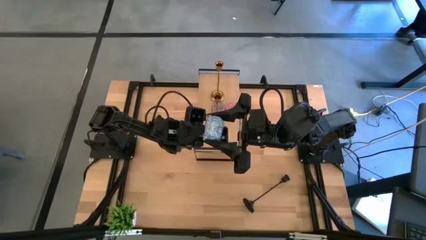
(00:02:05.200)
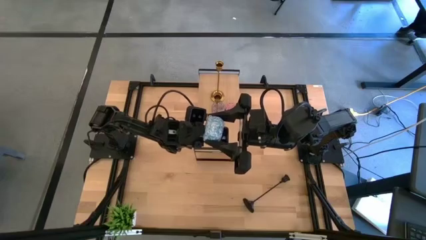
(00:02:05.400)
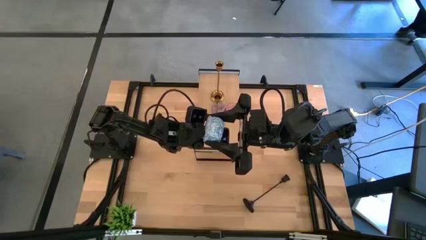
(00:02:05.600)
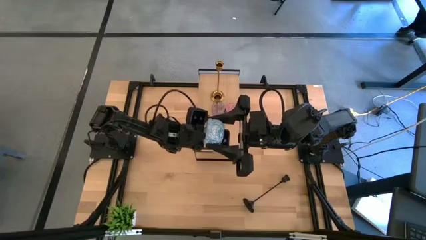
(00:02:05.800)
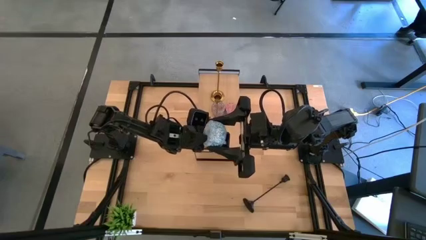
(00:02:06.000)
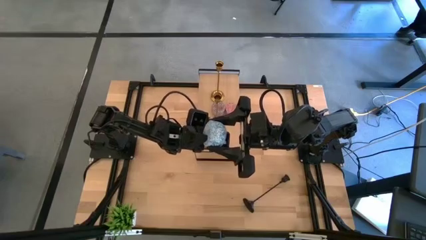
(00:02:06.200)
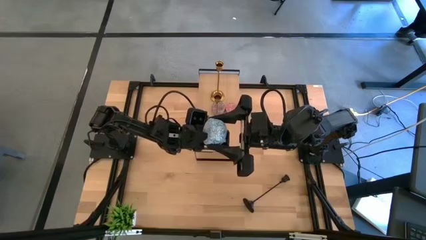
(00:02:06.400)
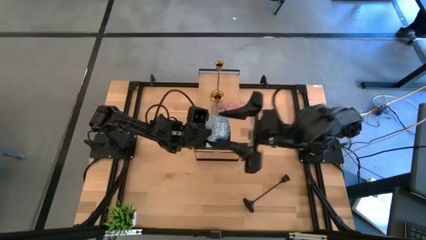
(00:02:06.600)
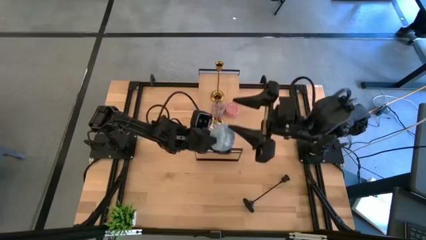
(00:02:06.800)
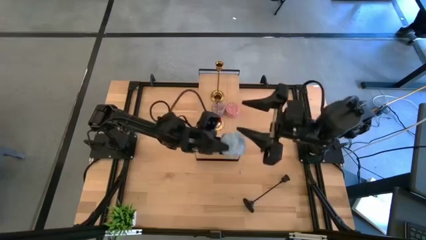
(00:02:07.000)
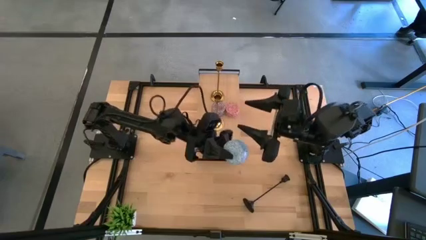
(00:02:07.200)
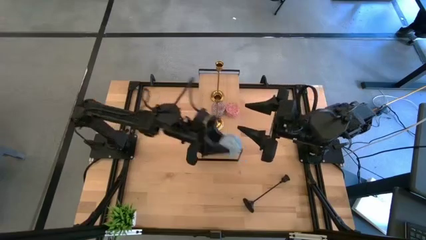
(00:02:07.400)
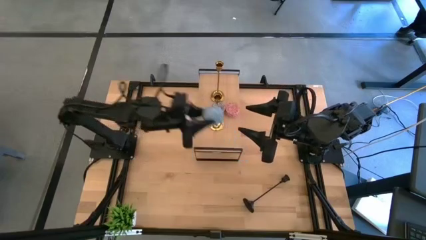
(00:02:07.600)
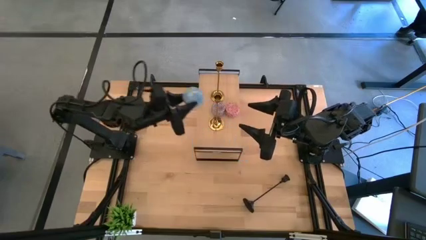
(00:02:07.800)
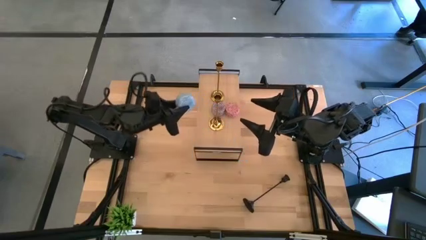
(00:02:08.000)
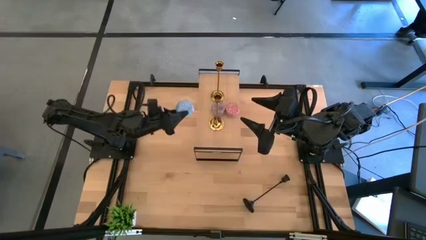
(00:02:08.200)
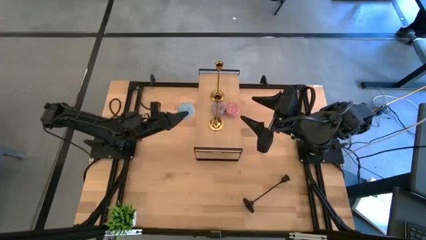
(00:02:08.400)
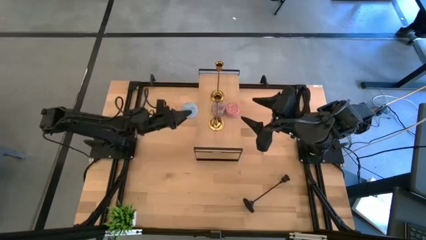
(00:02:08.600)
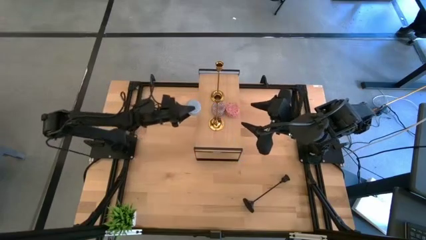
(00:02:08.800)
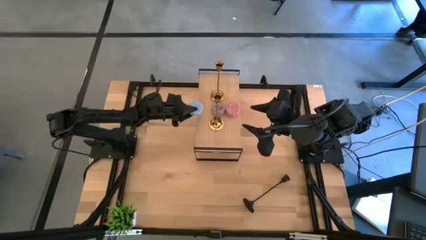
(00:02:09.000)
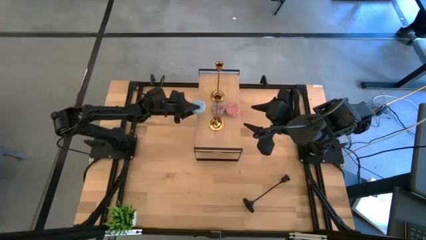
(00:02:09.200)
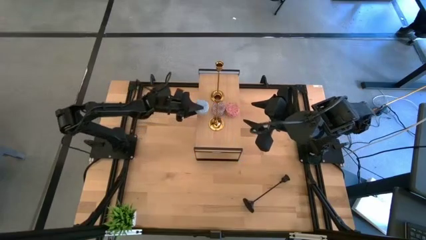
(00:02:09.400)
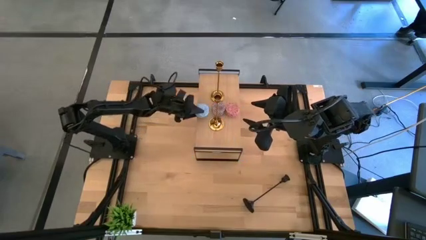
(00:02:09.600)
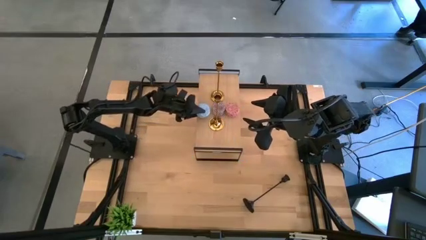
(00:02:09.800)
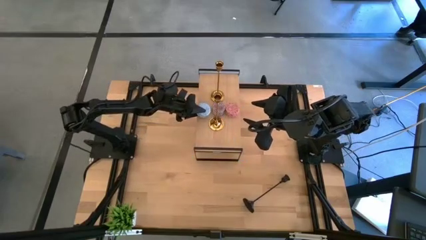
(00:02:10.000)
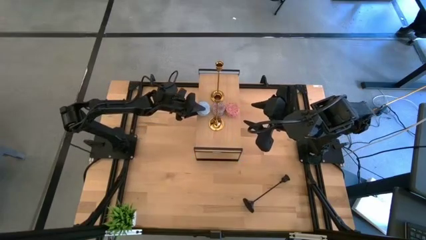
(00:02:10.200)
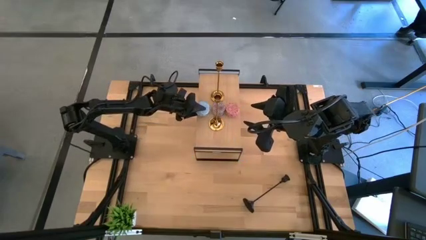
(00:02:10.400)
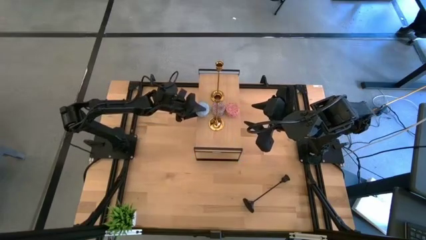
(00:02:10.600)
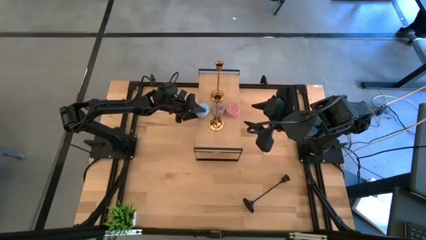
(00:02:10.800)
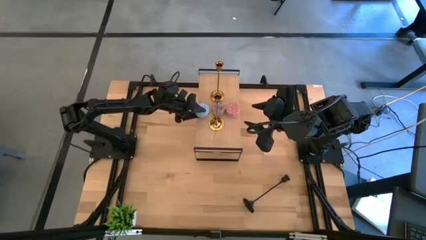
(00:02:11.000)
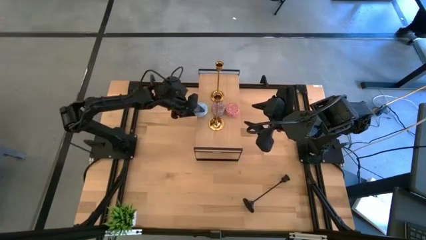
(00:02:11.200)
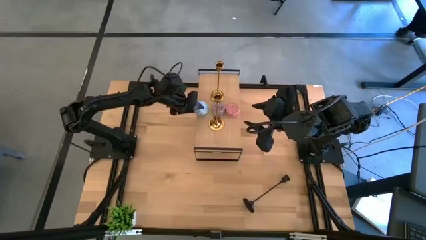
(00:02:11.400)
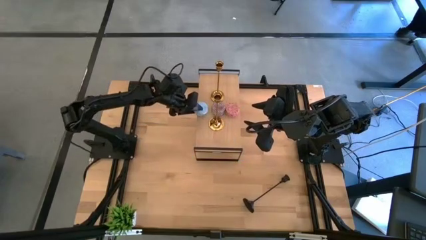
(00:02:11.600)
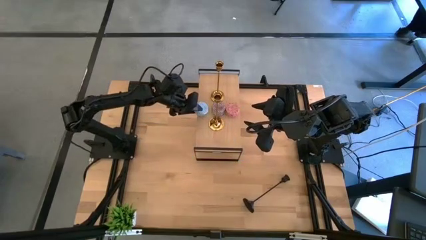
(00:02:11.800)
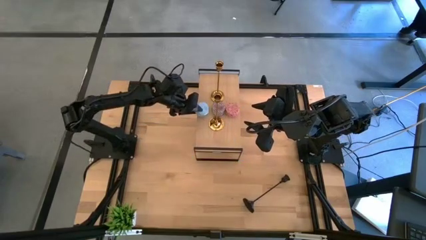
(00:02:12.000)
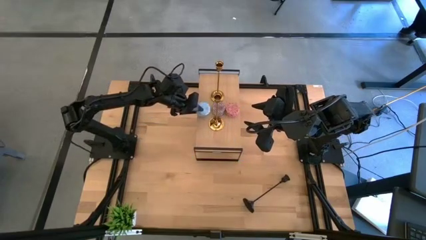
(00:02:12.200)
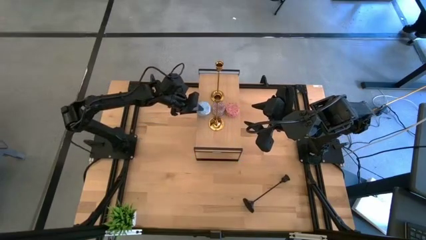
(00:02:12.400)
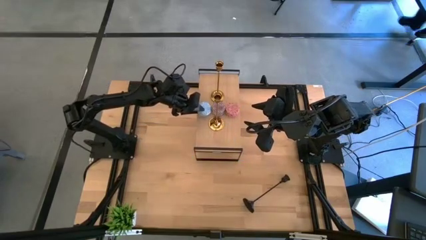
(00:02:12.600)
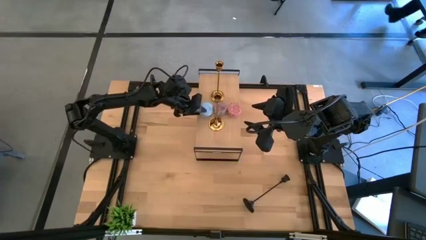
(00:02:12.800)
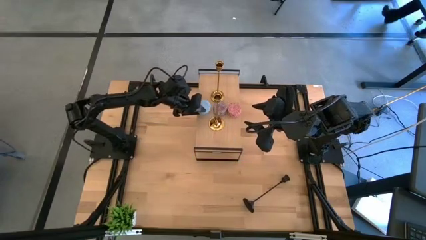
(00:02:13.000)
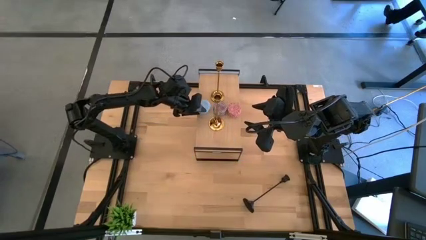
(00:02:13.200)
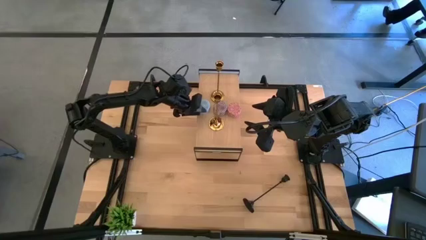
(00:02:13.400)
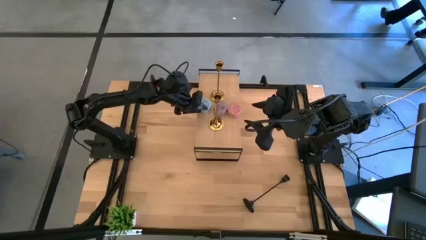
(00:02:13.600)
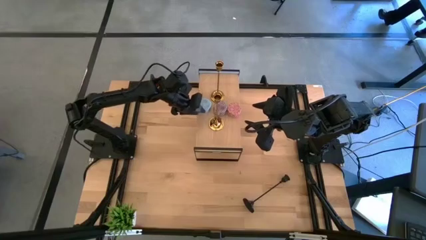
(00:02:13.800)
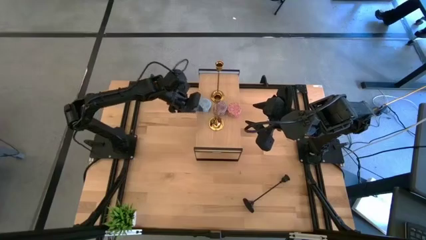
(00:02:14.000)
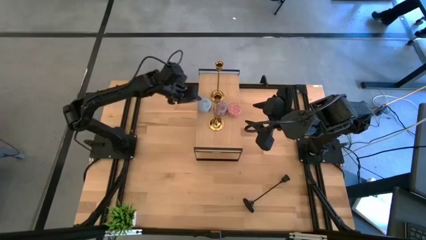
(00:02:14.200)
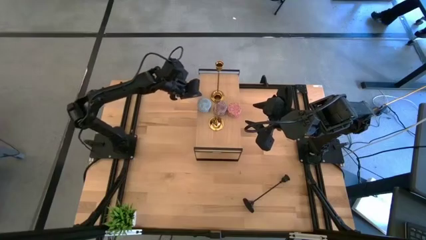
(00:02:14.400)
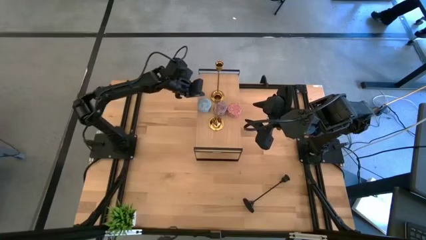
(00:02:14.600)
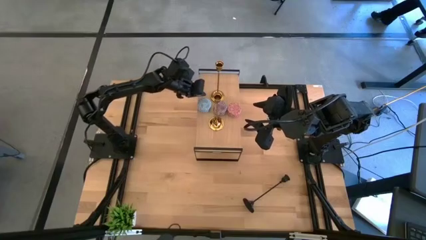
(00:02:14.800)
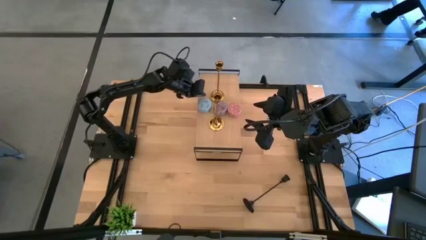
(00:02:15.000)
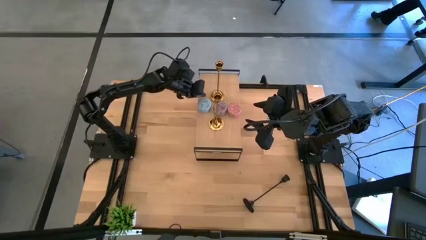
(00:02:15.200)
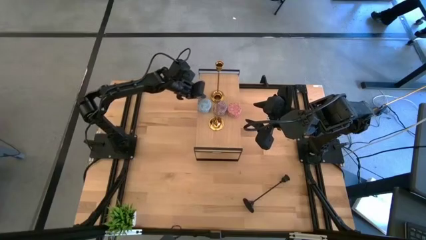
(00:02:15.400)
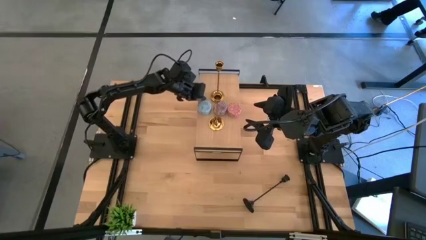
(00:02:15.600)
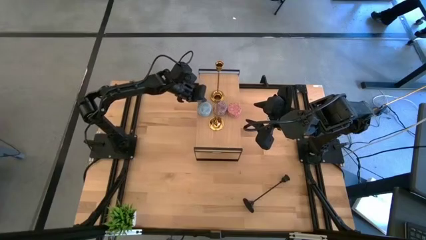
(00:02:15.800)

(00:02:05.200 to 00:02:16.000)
Task: Pick & Place candle stick holders
Put the blue scented candle on the shelf

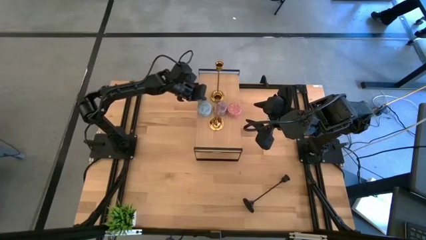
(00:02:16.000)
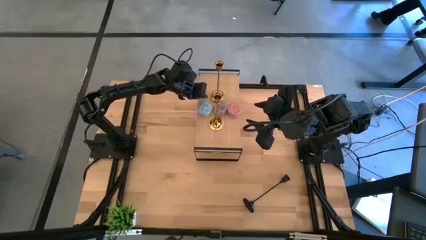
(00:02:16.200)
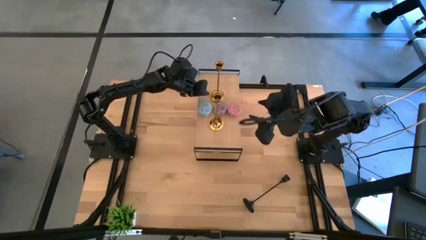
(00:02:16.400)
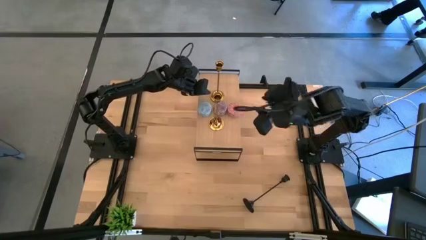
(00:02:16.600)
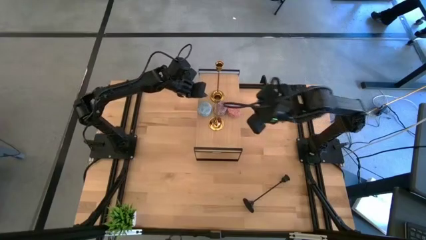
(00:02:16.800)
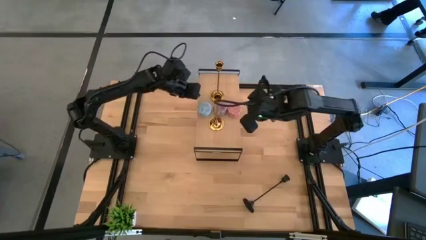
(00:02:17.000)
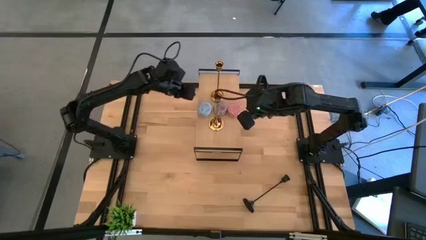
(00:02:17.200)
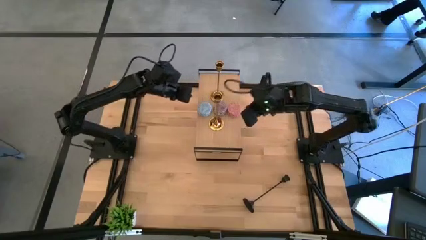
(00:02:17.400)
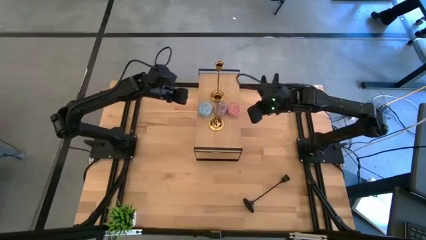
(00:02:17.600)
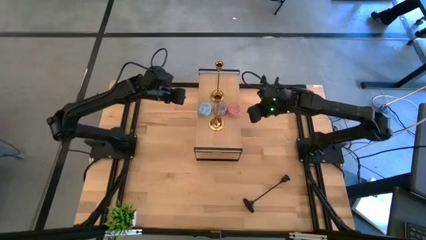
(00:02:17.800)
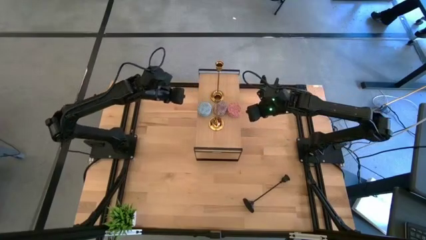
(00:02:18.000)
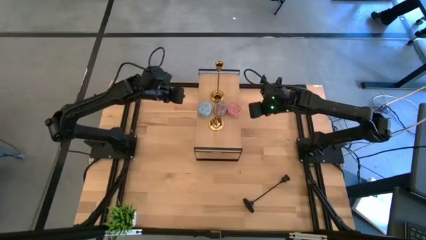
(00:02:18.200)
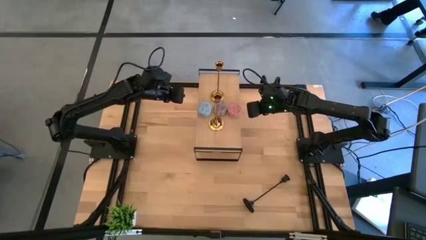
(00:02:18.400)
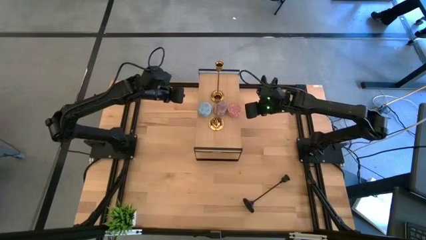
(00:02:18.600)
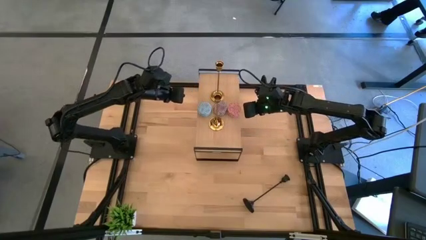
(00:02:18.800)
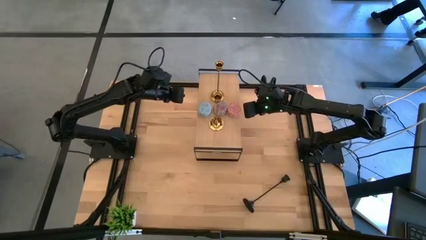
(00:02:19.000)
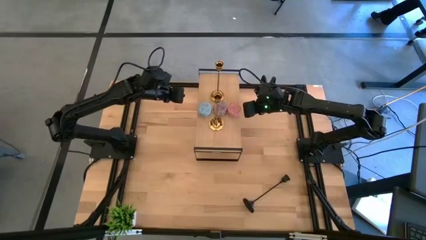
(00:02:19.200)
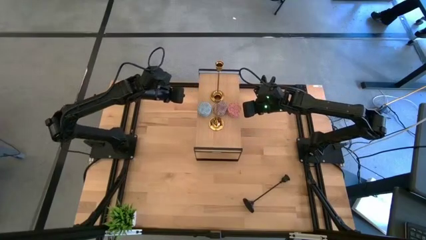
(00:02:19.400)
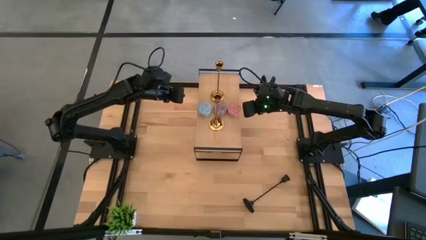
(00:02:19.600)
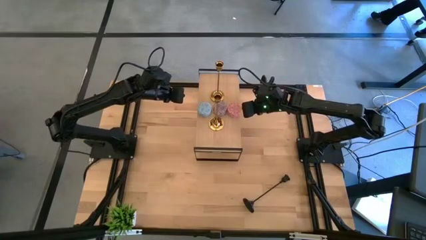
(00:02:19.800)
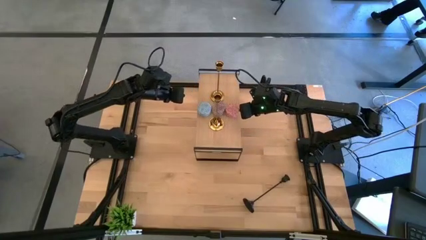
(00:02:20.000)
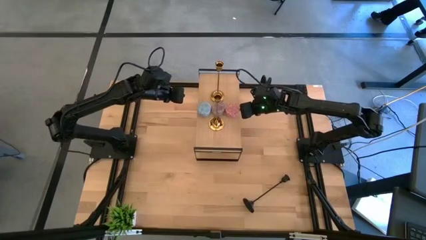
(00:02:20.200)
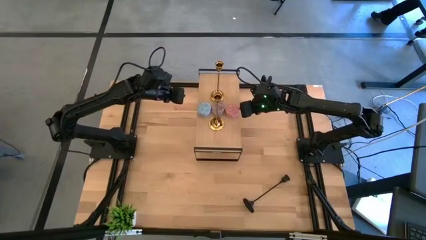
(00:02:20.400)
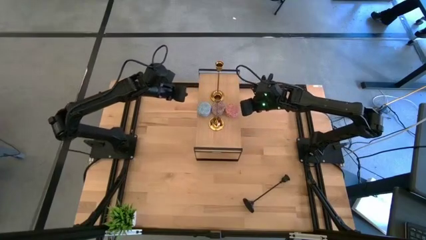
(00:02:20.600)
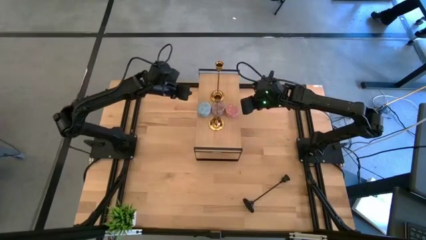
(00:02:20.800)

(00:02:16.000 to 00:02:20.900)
Adjust the pink scented candle
